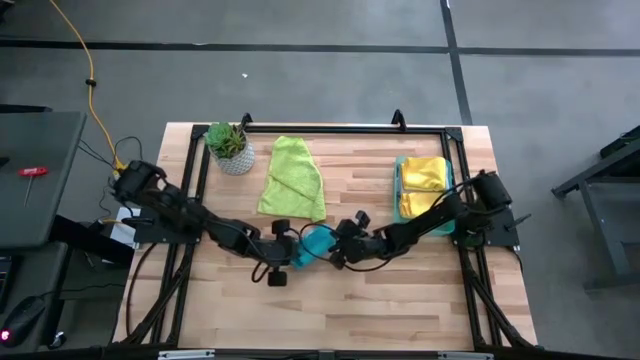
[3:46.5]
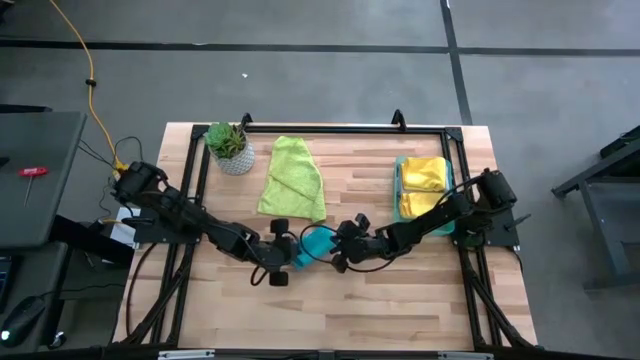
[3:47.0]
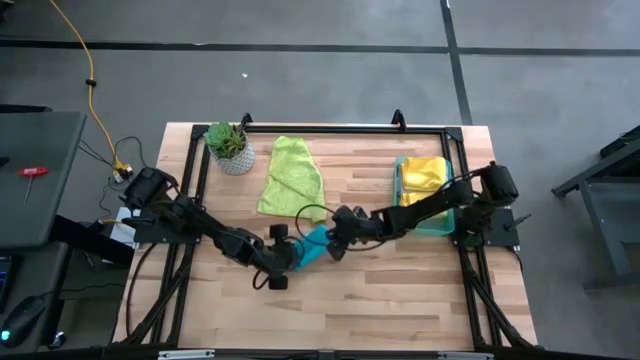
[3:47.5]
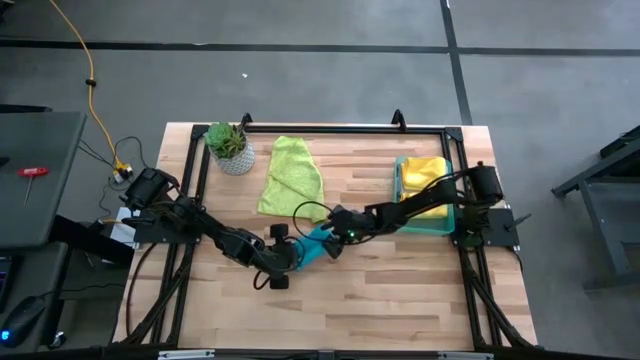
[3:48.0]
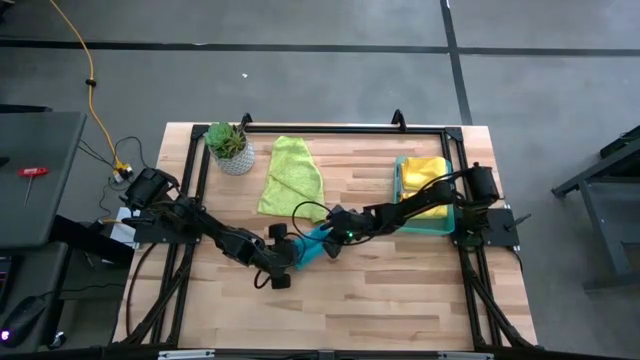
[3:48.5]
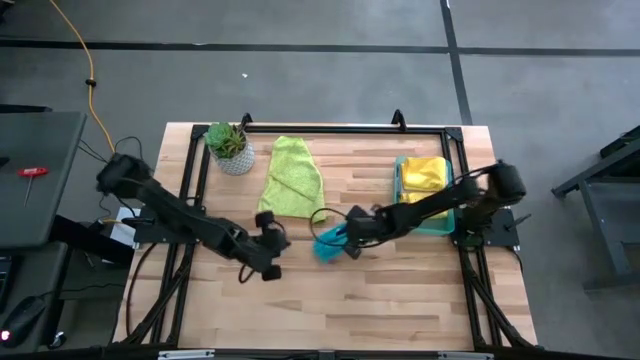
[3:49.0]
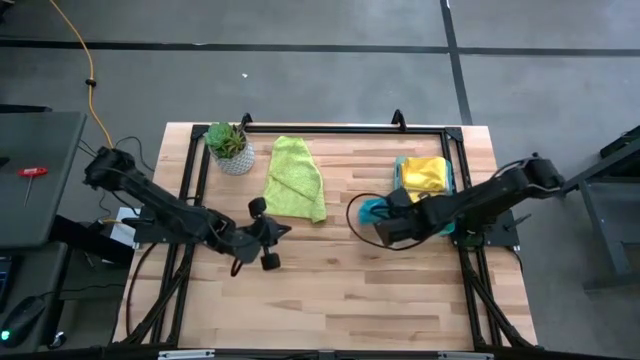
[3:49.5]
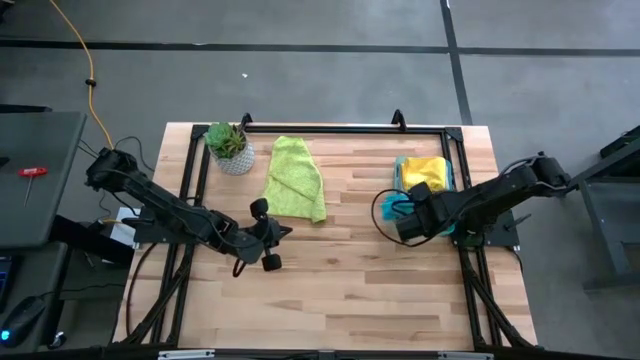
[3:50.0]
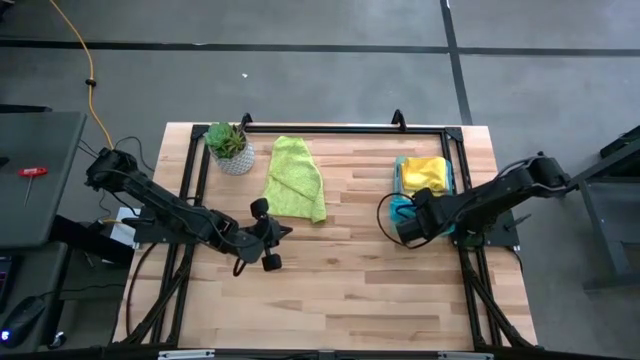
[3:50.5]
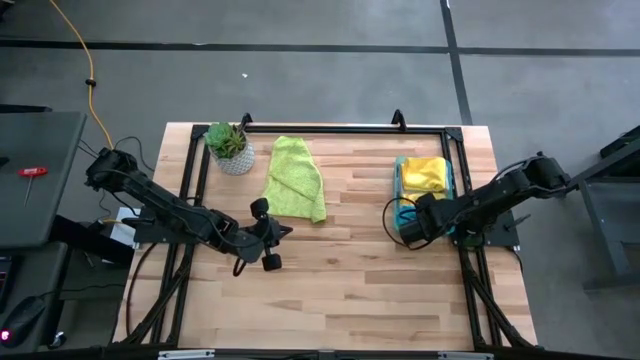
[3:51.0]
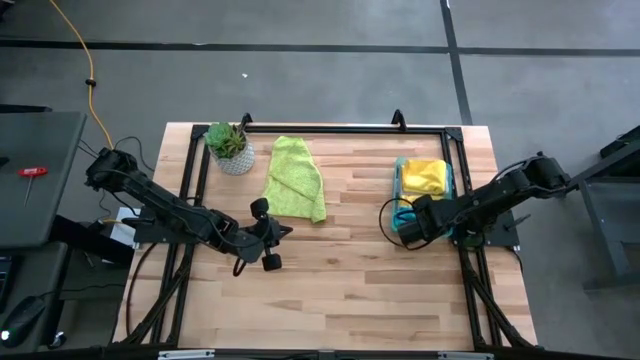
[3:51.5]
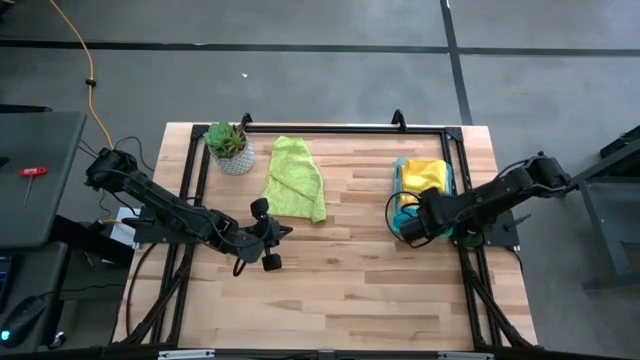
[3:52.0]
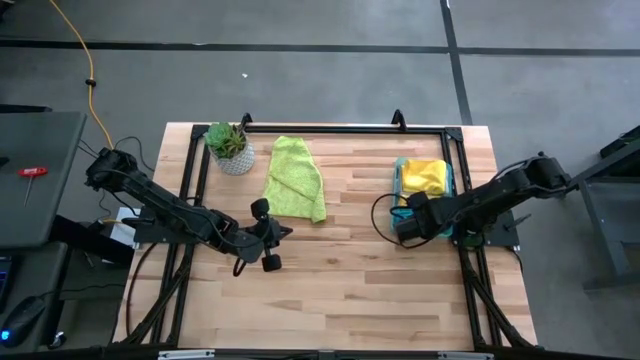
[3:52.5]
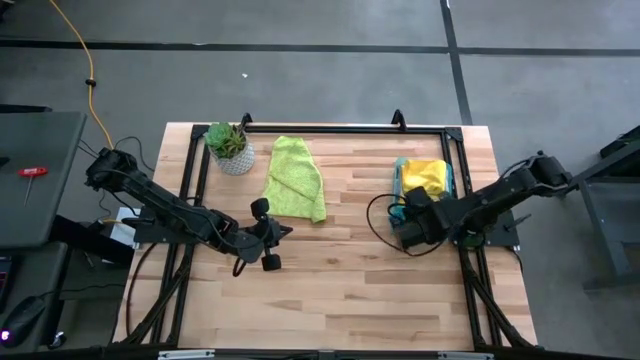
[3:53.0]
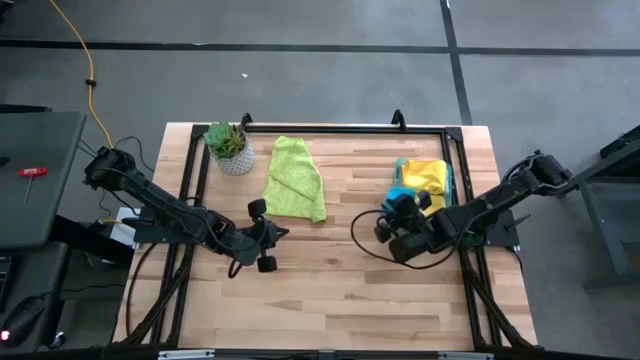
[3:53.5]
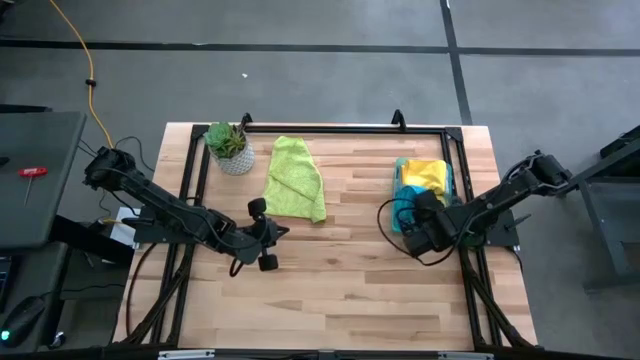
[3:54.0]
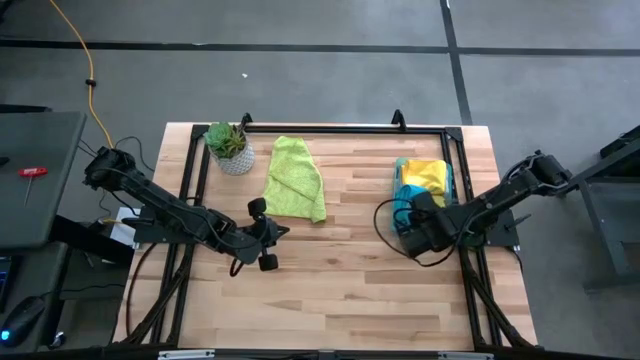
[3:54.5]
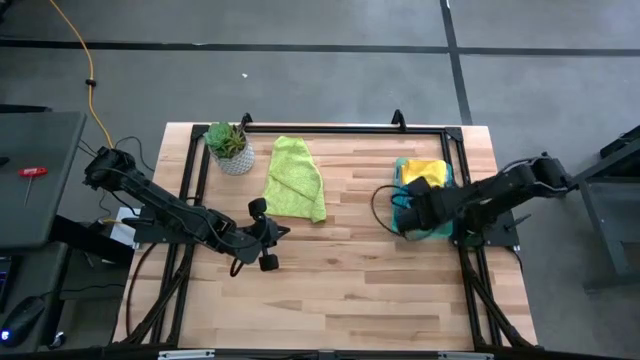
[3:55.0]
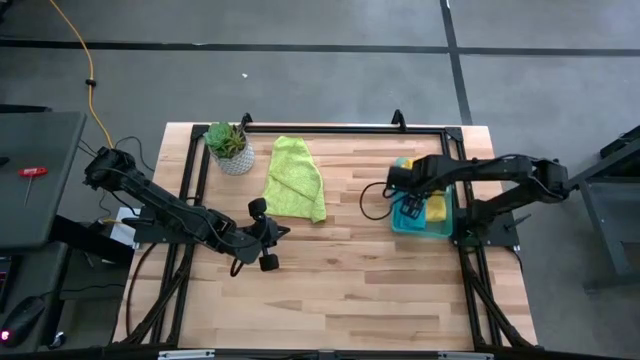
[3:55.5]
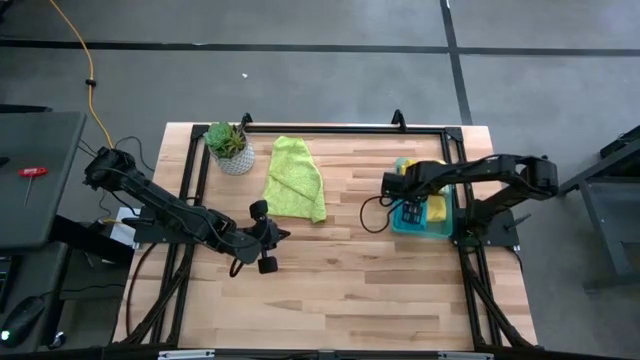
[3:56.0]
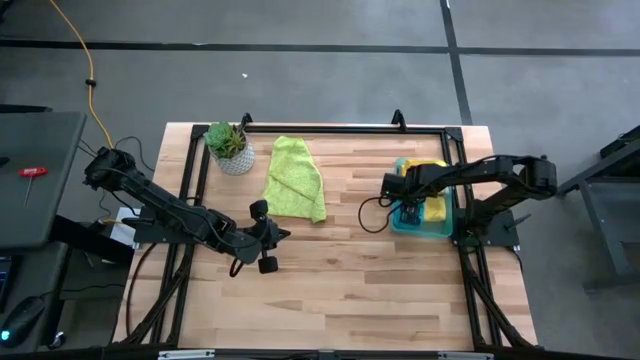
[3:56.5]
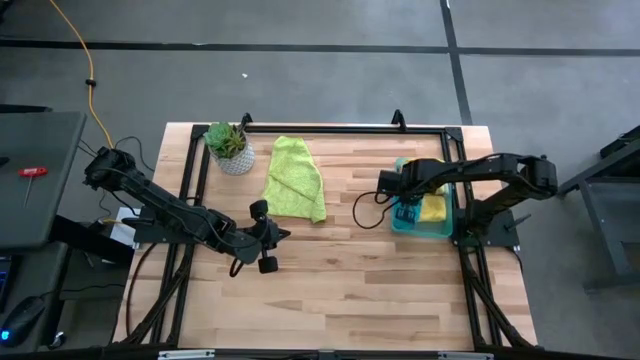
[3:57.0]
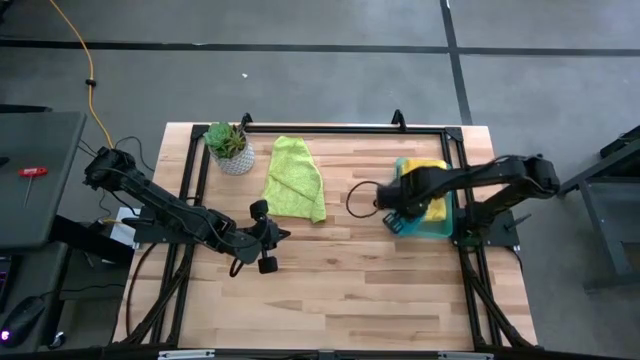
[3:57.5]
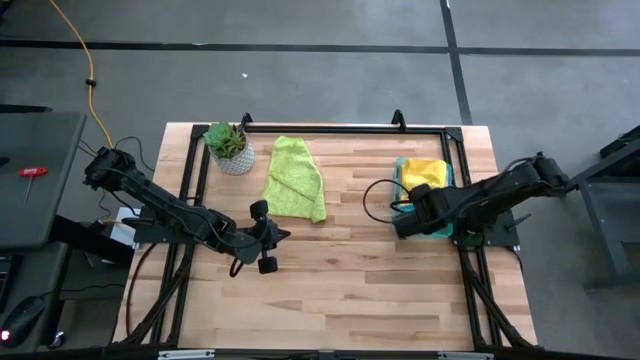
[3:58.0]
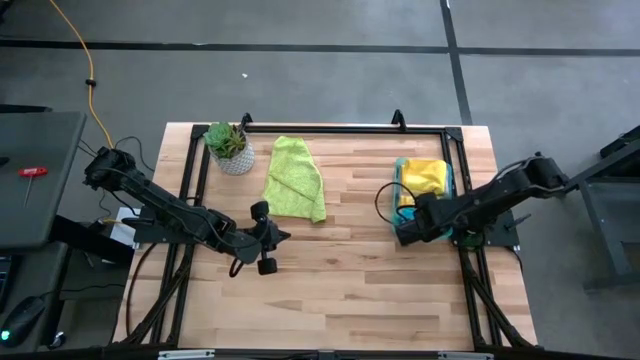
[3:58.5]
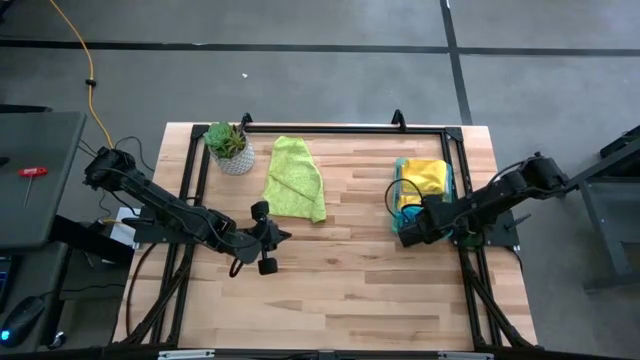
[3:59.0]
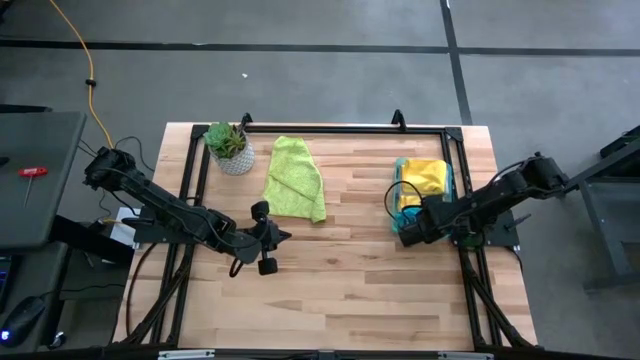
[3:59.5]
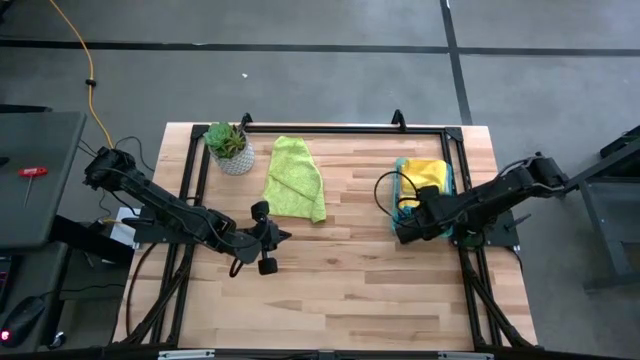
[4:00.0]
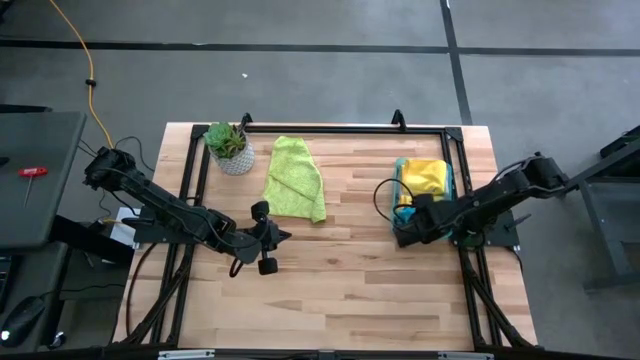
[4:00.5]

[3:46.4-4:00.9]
Task: Fold microfiber towels
Put the blue microfiber cloth into the bin

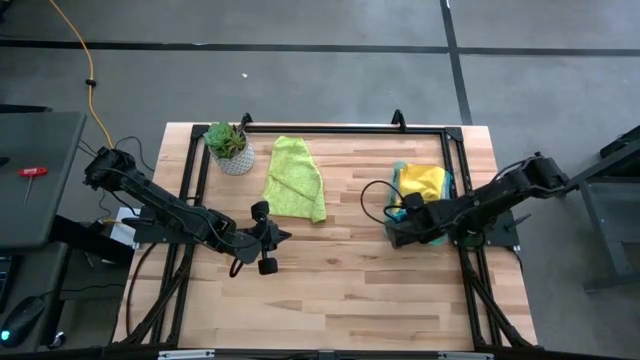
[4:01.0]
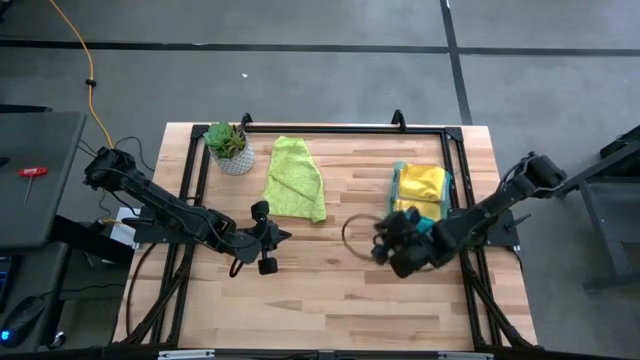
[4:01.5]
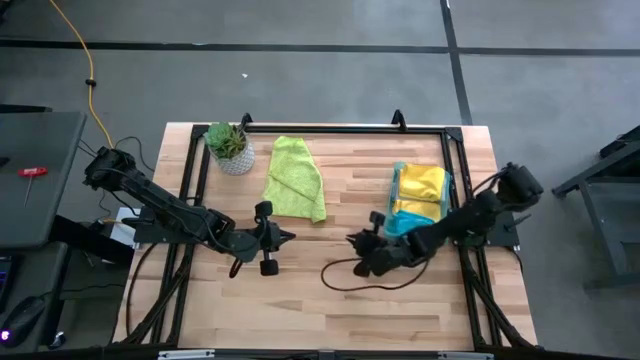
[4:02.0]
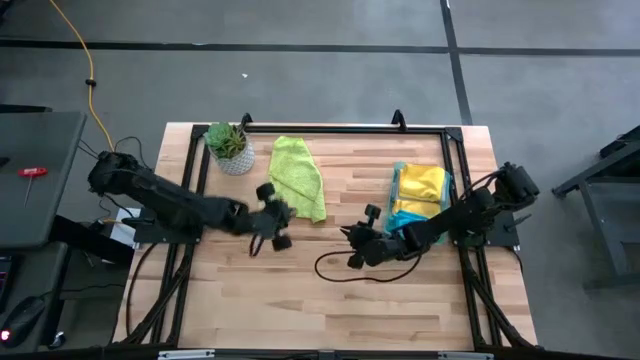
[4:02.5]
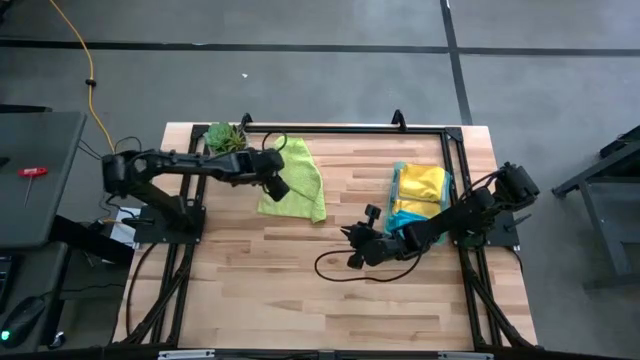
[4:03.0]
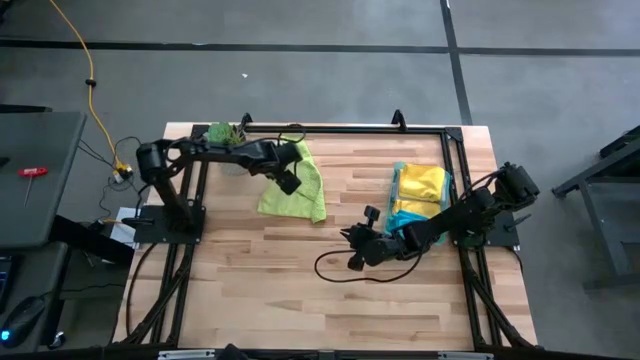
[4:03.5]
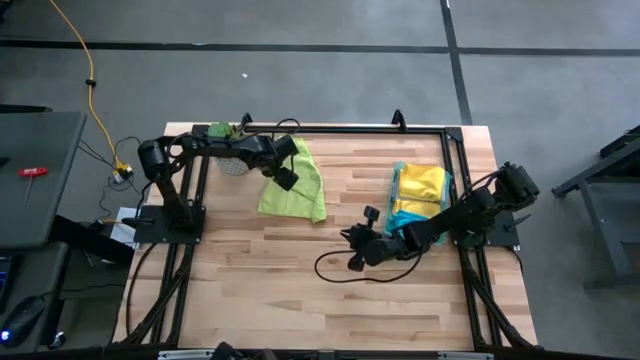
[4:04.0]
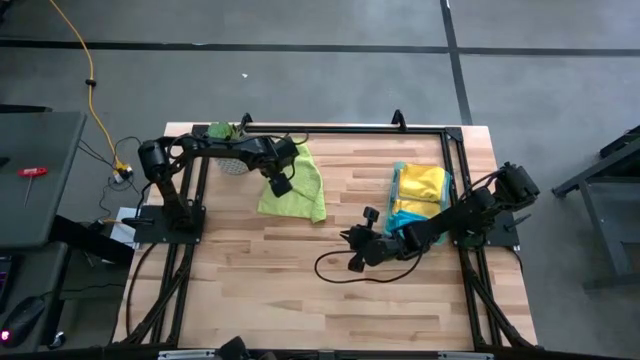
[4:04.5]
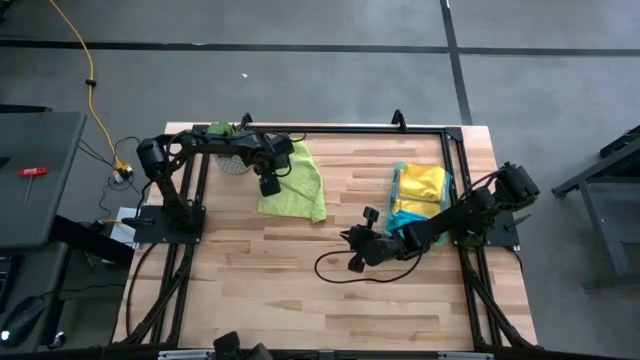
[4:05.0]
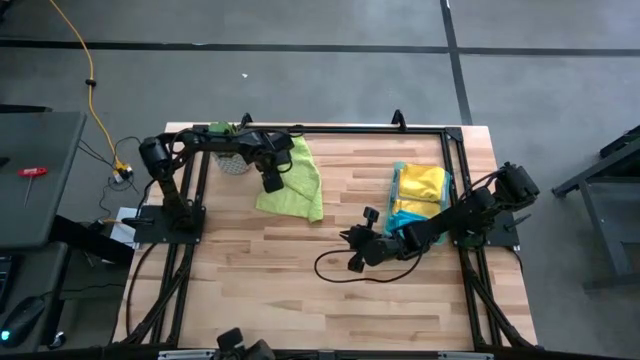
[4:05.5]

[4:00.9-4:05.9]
Fold the green microfiber cloth
